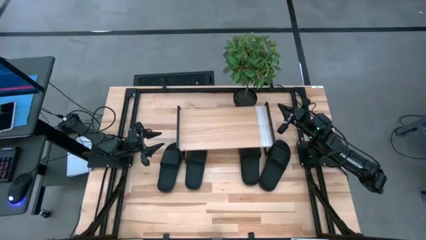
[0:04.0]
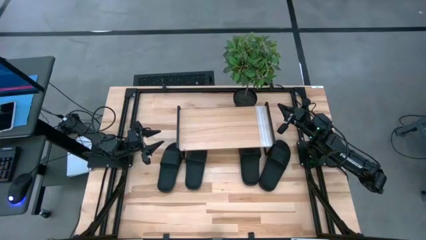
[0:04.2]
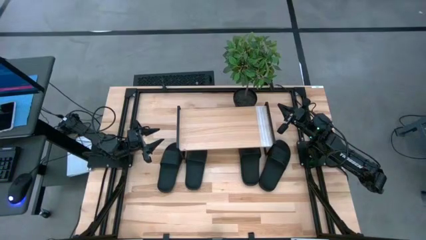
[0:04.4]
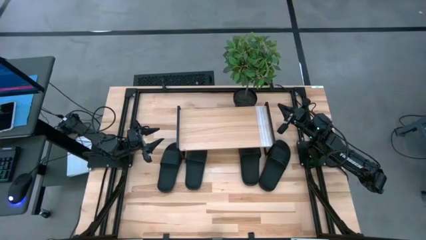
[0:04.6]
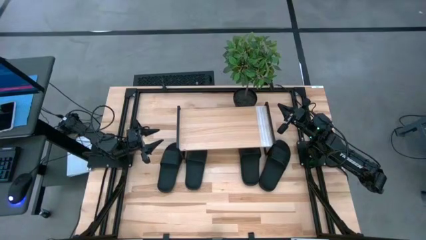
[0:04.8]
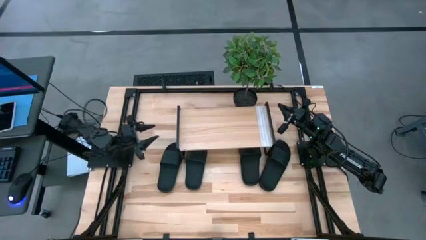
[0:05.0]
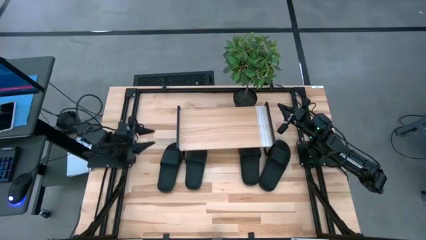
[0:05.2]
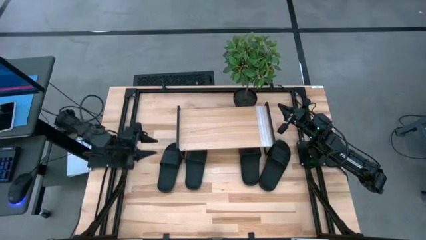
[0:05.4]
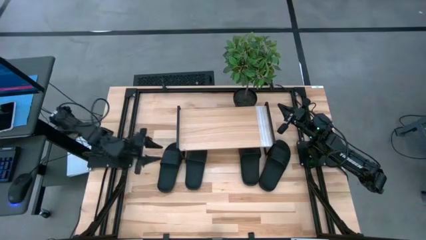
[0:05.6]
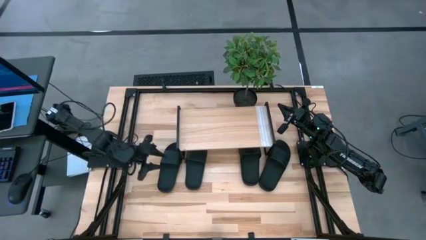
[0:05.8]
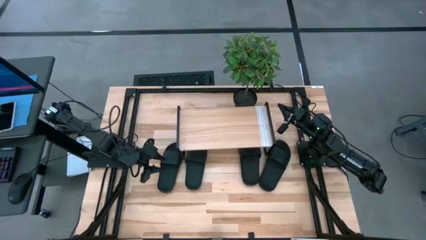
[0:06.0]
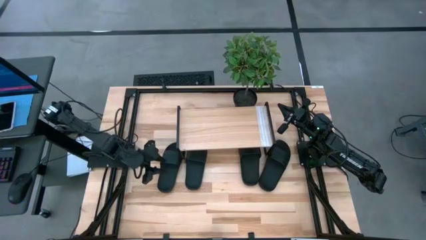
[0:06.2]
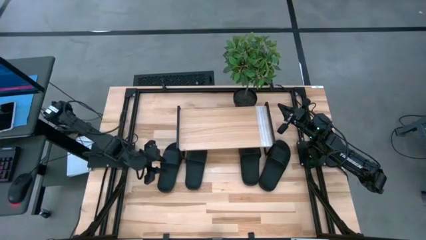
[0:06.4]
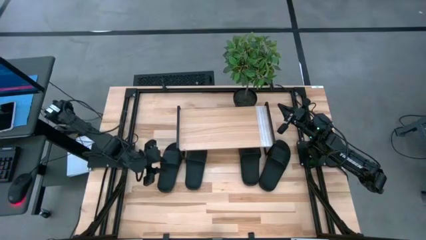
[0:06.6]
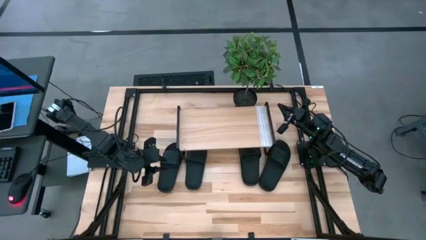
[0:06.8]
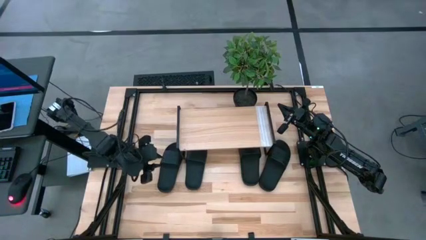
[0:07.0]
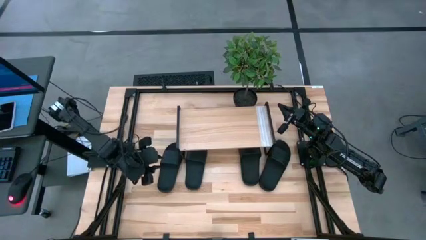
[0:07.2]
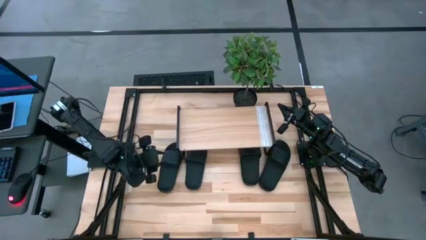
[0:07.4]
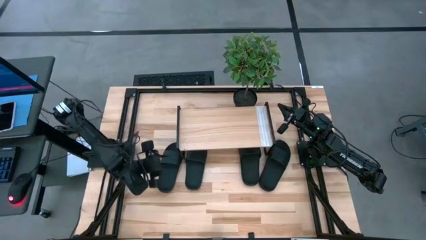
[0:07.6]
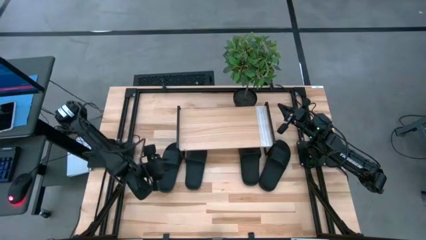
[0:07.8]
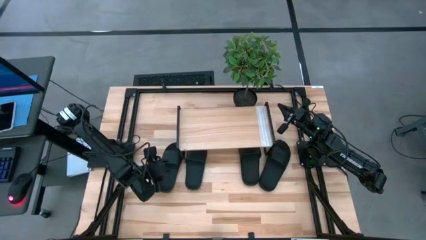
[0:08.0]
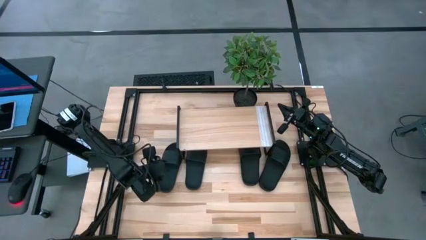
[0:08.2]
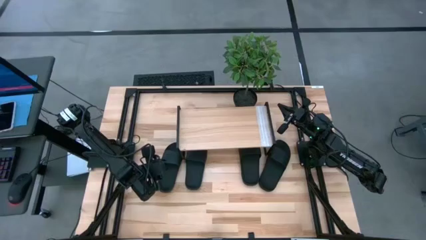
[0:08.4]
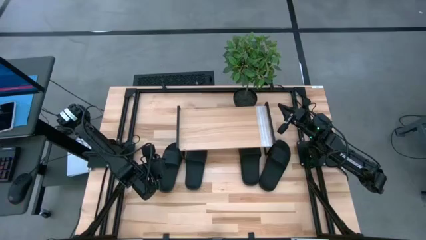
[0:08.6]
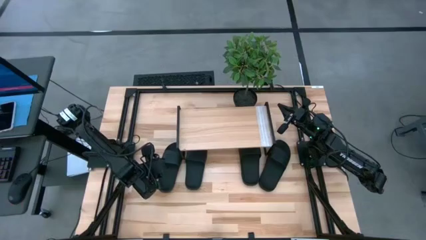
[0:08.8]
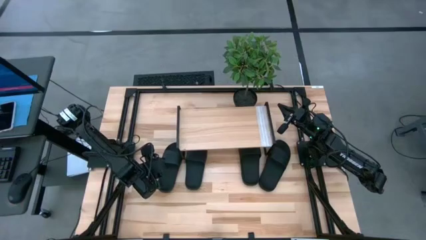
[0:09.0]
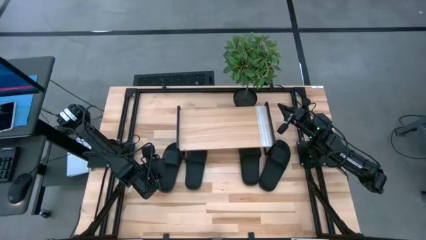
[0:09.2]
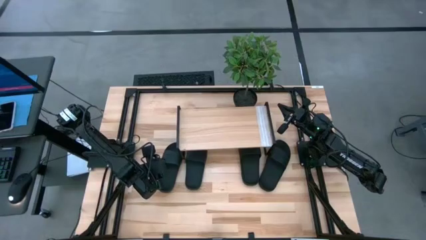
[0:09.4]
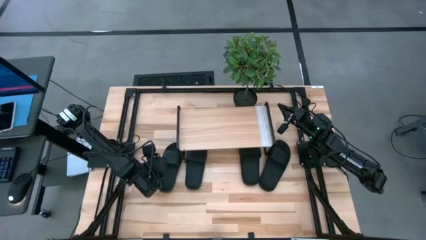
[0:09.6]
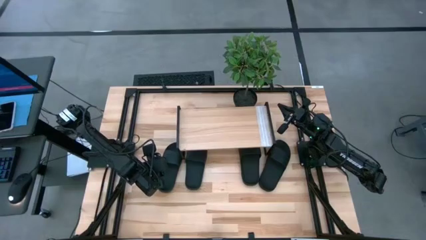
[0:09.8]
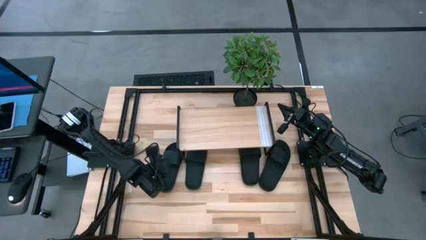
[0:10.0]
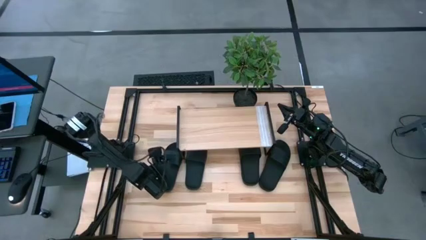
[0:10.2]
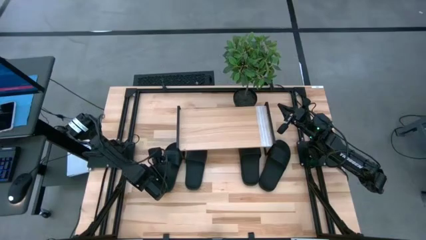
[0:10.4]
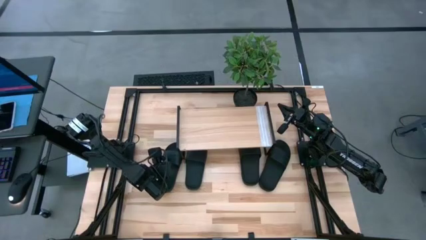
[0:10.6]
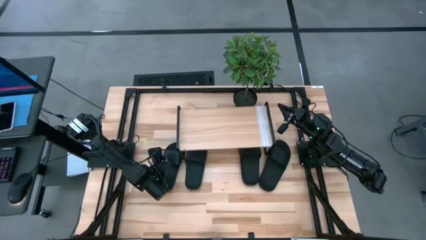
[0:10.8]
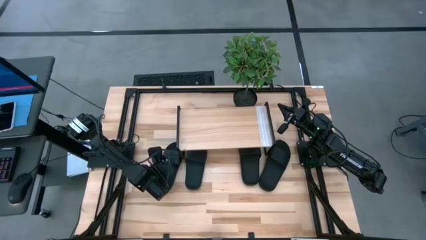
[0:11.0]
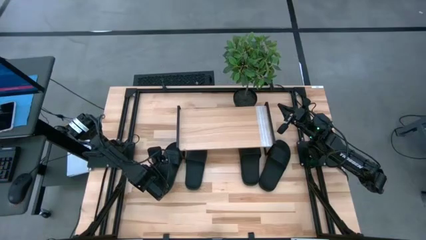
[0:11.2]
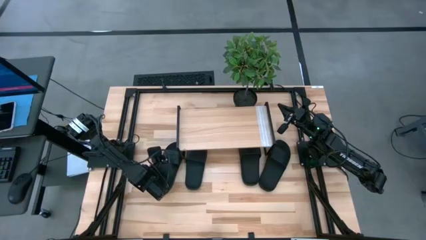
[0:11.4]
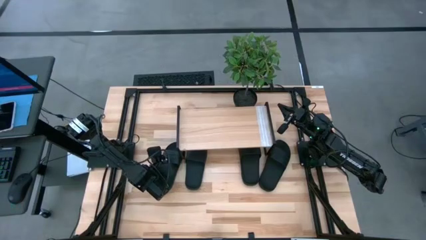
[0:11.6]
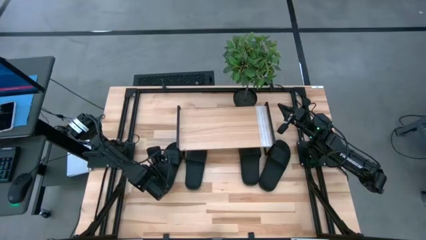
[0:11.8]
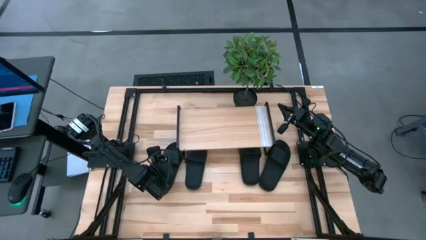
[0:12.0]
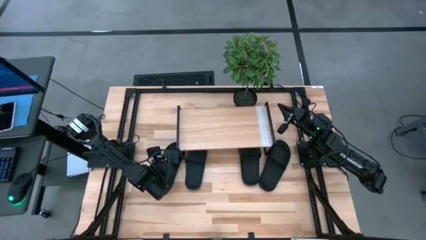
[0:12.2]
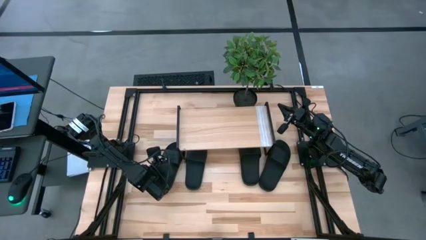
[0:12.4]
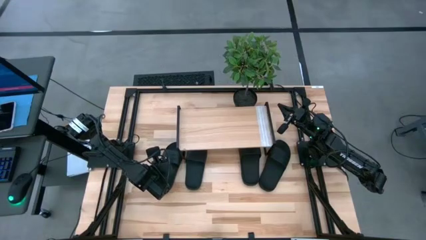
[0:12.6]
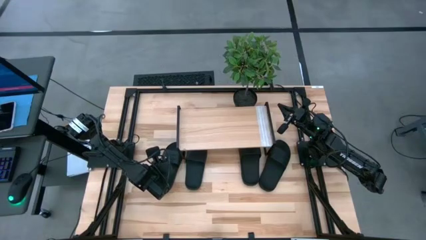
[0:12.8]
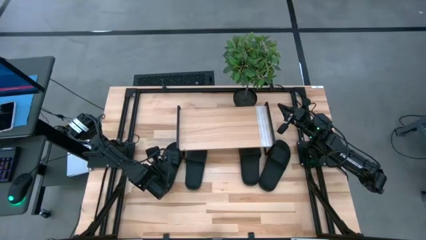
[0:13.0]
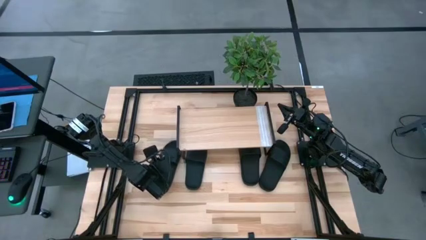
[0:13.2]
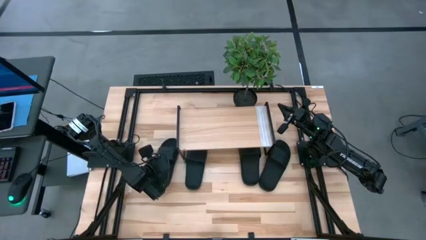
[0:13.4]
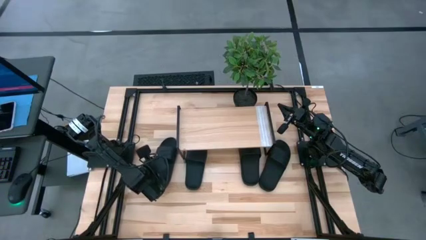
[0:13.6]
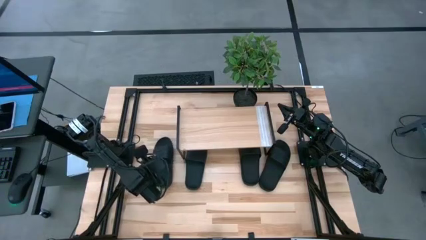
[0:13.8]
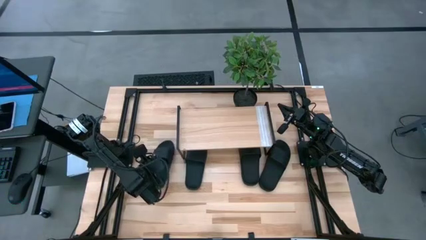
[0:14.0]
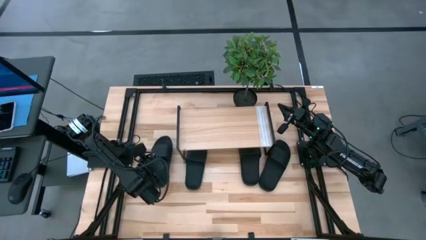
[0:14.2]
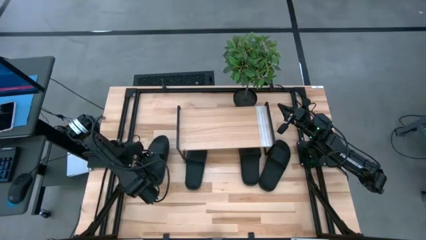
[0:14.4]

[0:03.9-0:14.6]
Task: Pick and place slides into the shelf
Put the black slide on the shelf

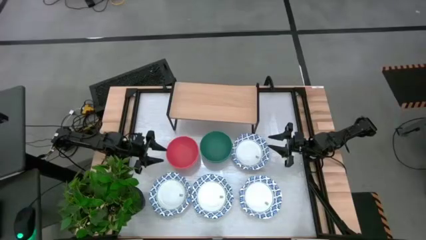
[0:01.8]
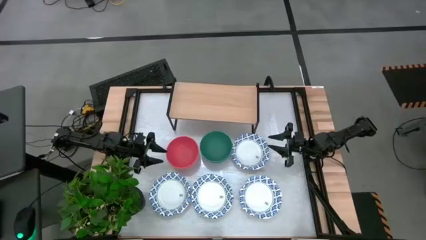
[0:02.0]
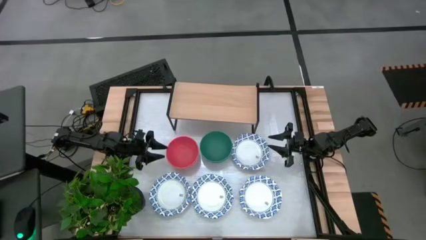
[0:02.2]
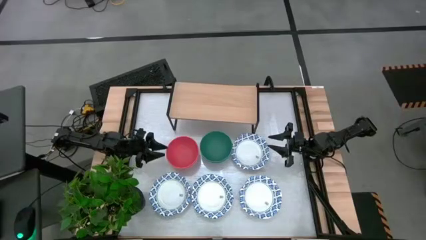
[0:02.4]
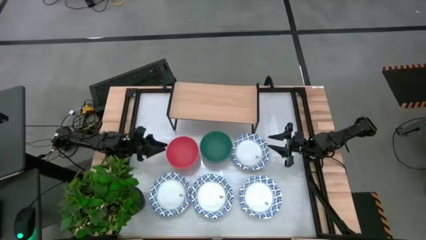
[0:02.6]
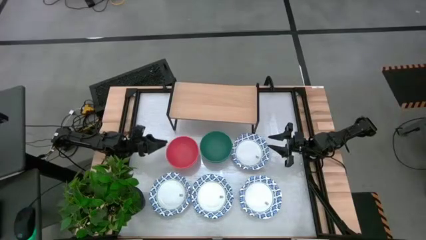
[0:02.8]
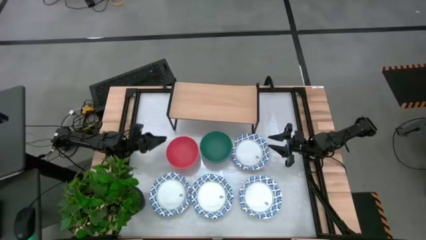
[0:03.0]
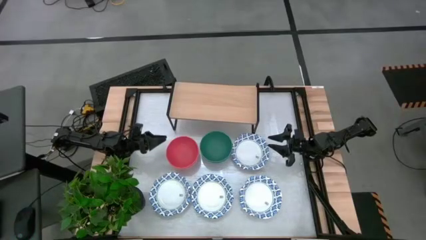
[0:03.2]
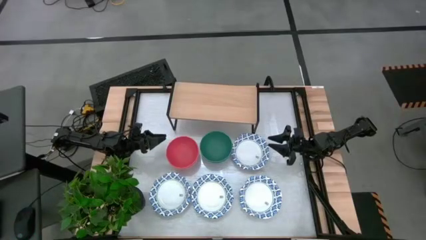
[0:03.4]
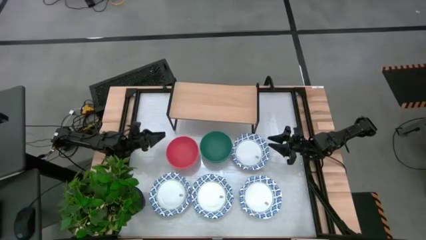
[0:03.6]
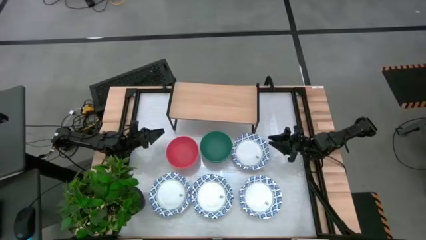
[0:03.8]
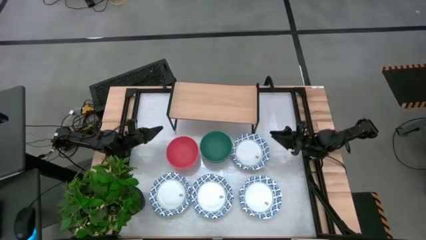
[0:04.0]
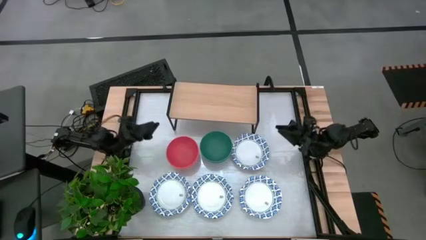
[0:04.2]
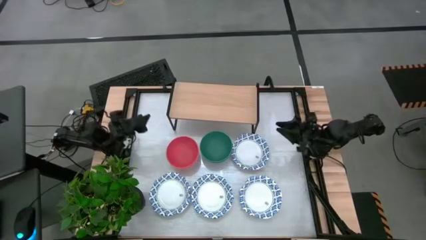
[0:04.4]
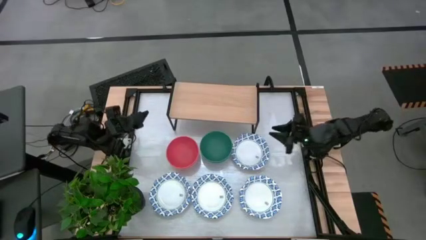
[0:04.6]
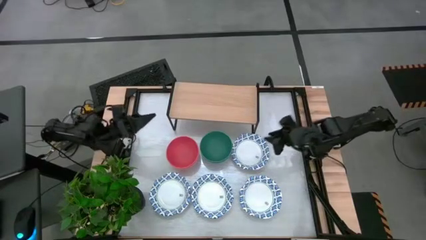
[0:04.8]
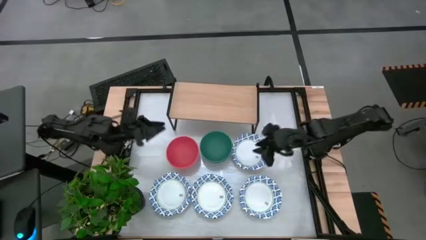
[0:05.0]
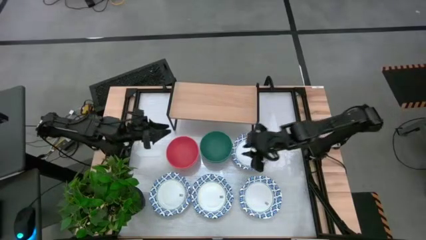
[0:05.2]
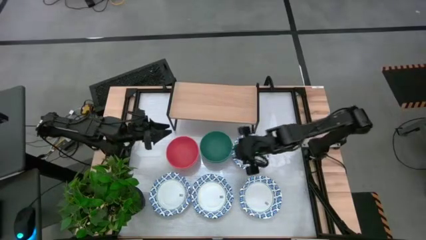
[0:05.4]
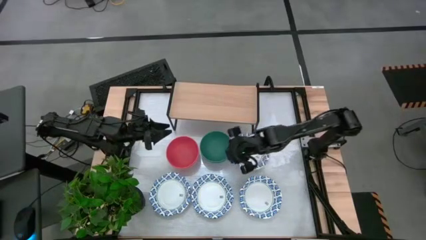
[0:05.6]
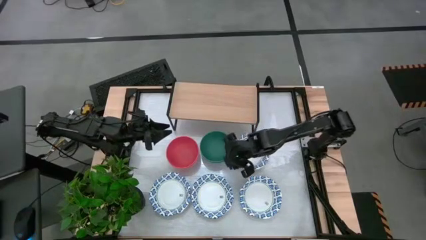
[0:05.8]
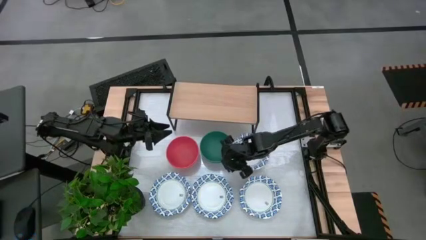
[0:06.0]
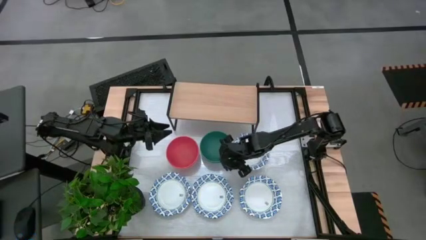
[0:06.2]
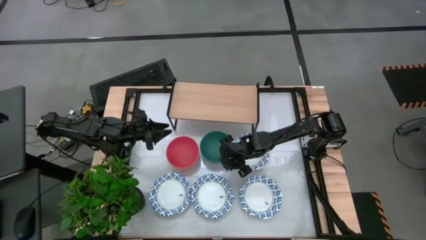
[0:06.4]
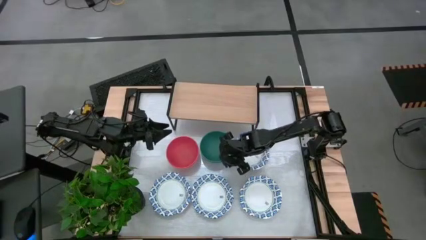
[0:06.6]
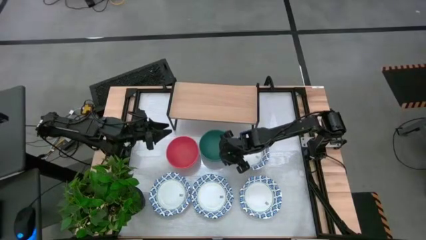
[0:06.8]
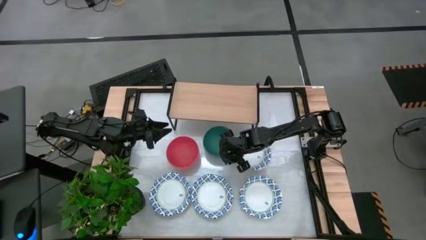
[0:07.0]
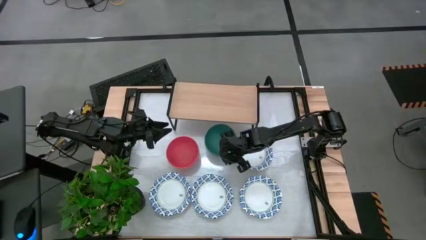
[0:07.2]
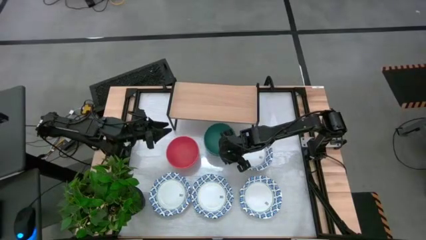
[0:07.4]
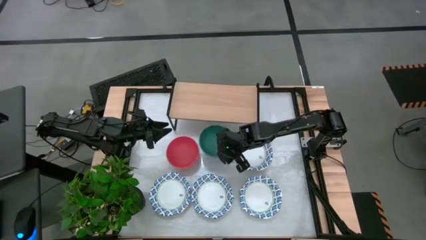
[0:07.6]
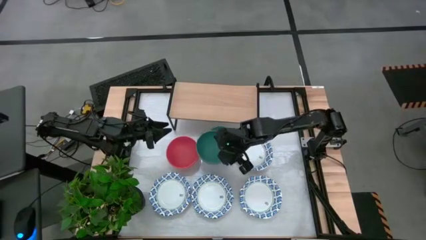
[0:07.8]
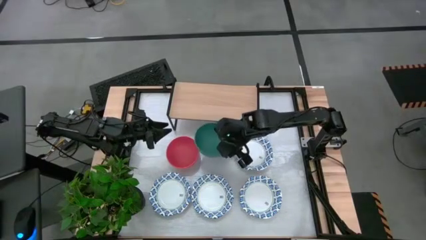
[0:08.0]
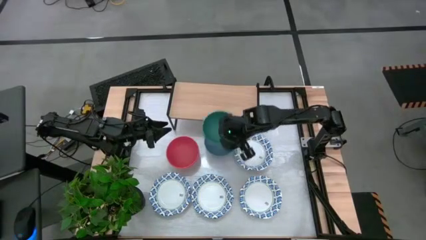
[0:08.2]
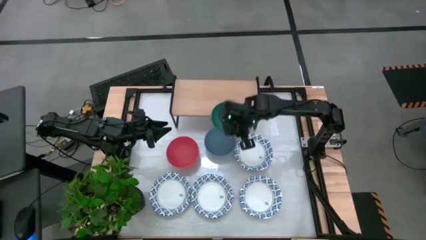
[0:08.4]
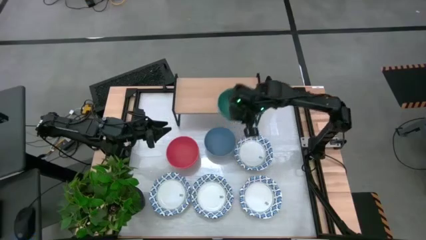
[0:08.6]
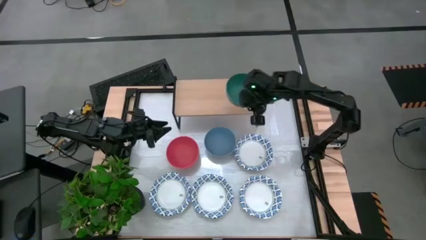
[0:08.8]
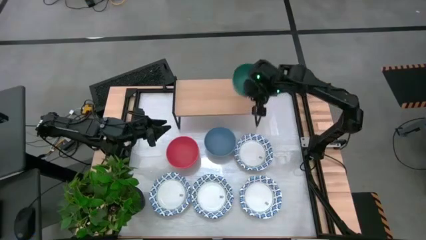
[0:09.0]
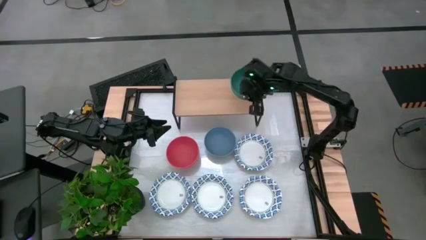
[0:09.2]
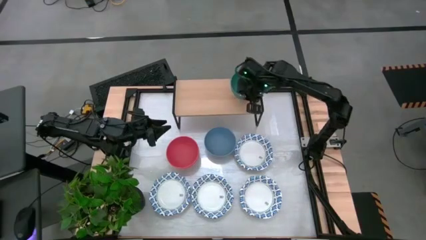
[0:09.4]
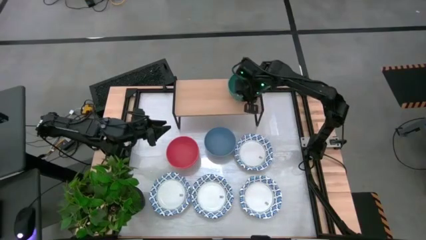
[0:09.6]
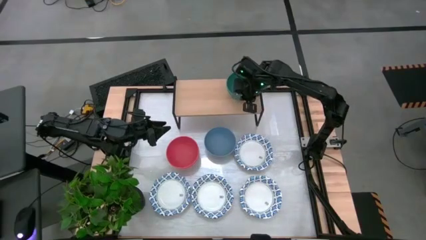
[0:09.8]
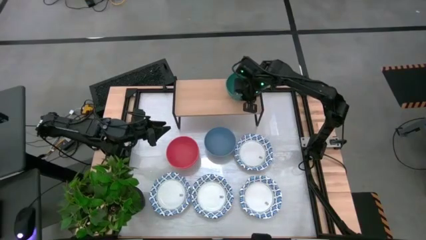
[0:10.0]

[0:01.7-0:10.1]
Task: Place and stack bowls onto a shelf
Put the green bowl on the shelf
